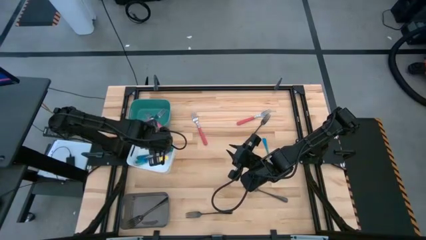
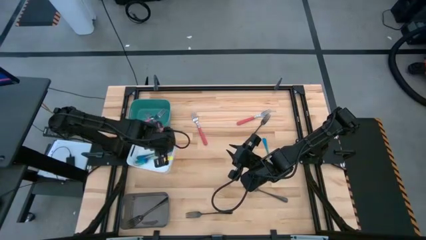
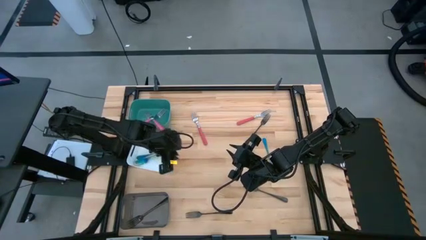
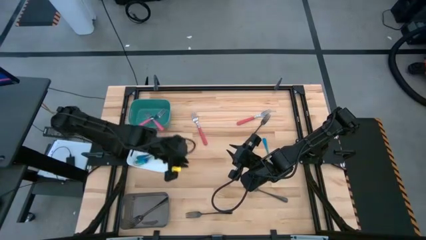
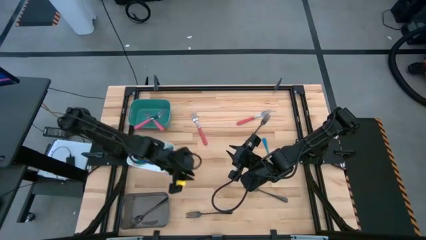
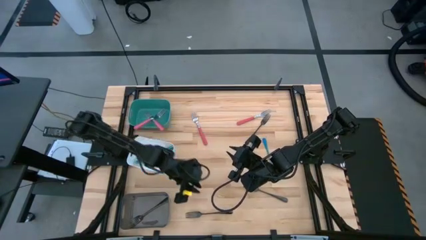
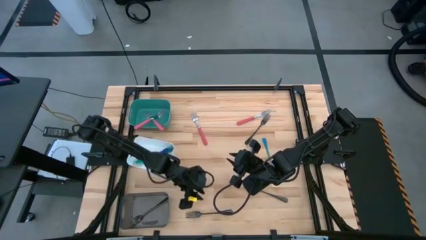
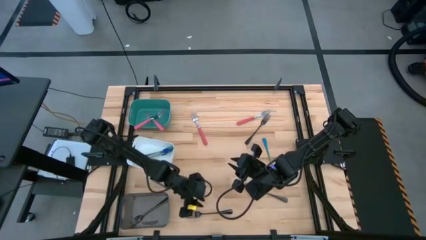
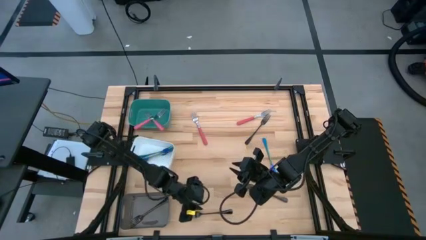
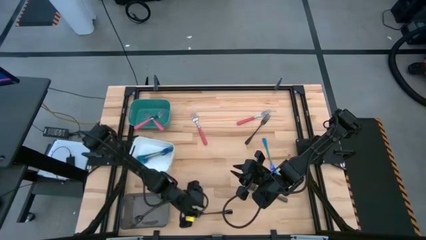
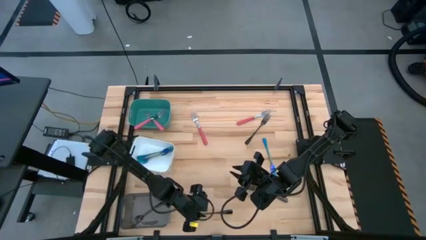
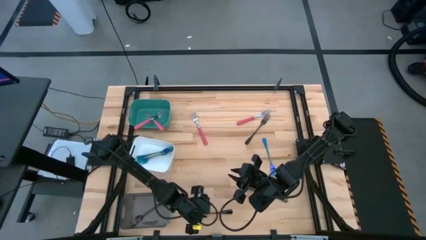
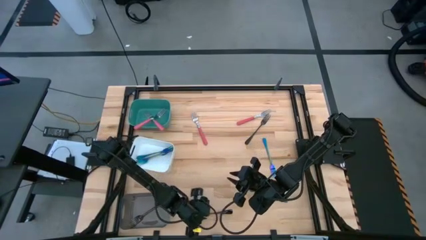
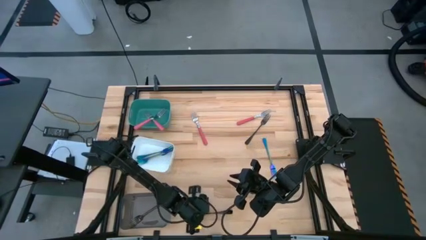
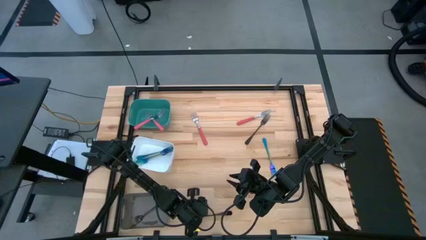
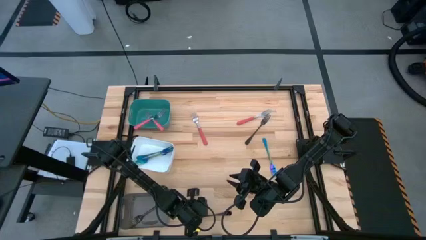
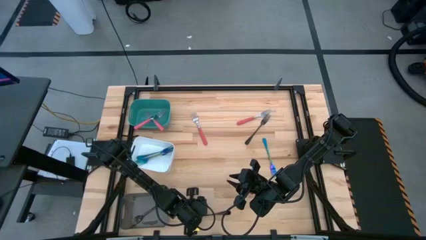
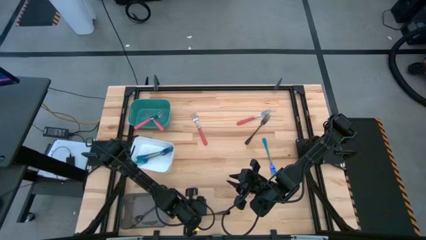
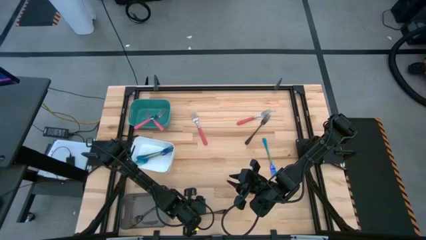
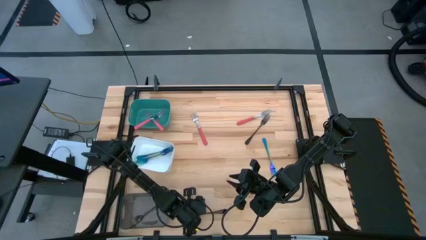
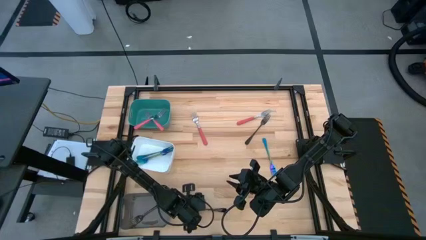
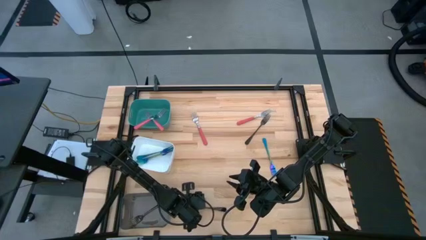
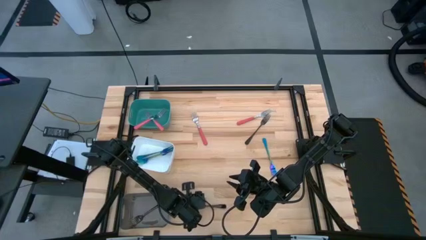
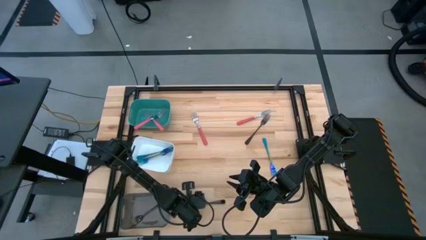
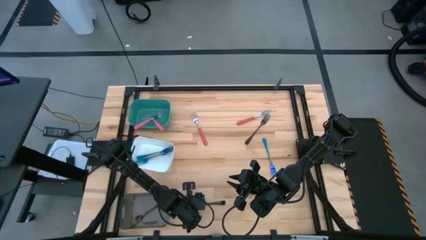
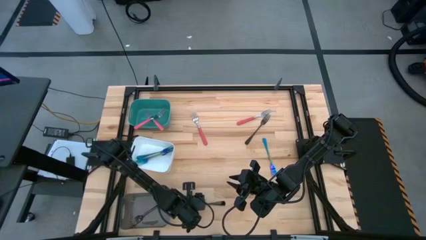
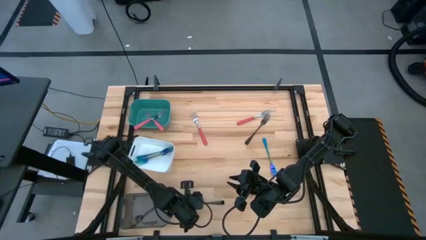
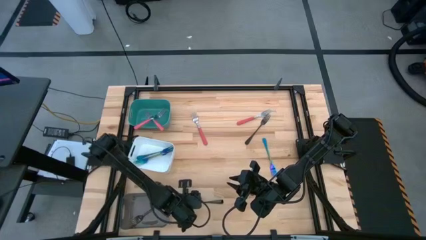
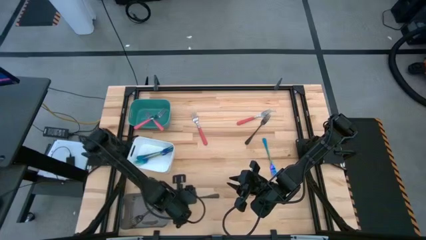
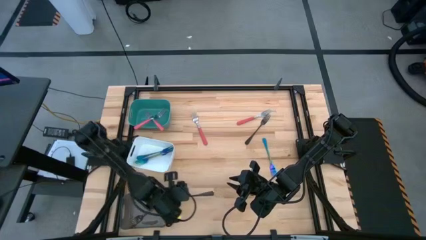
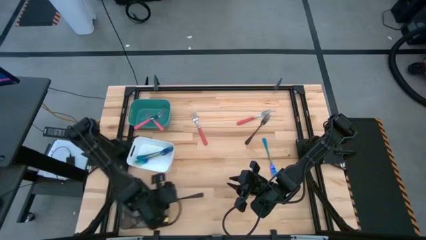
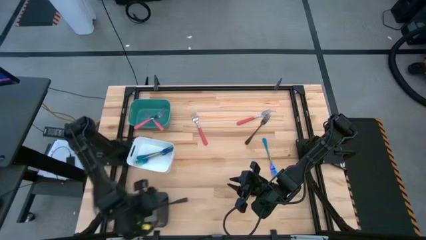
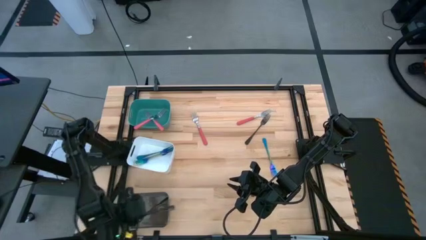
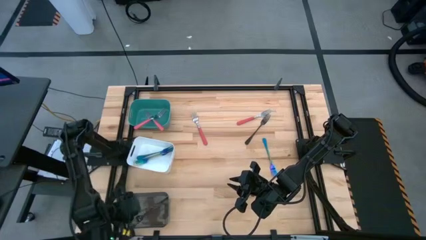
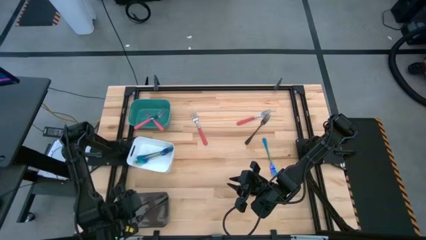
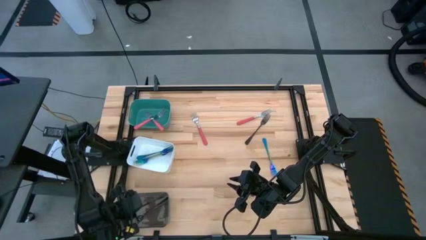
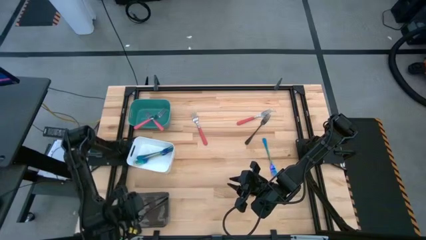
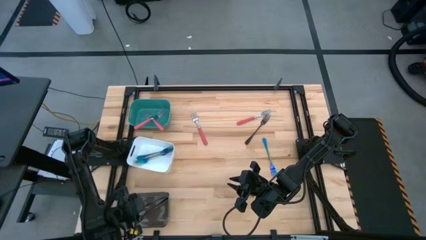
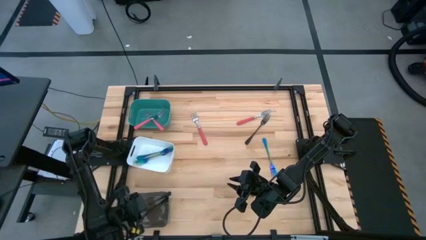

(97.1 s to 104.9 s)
Task: Sort silverware by color (type)
Put the black fork into the black bin

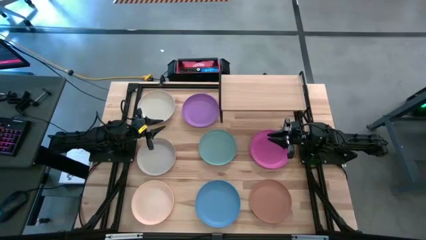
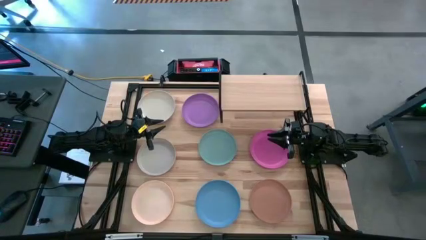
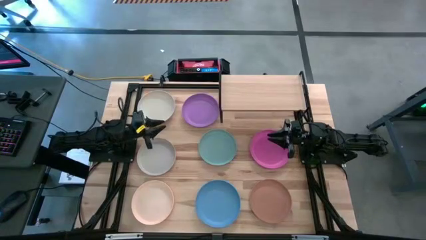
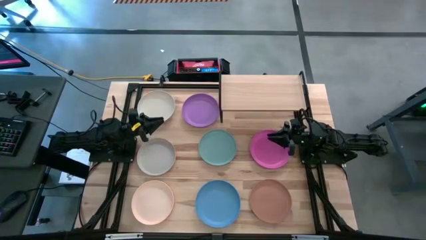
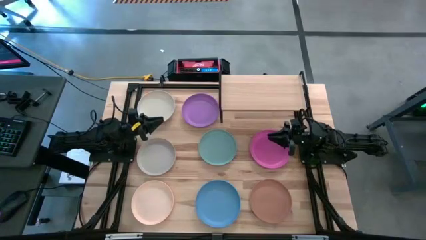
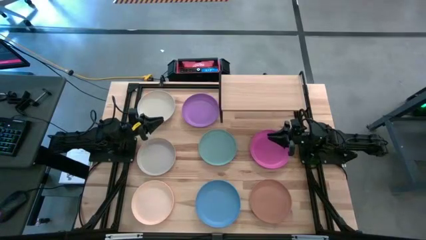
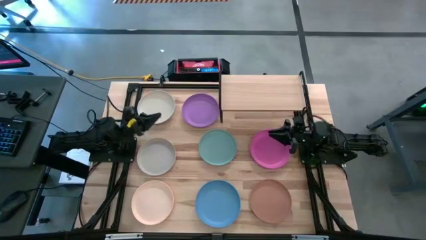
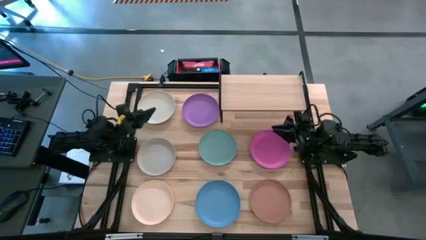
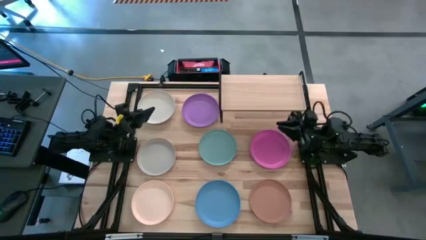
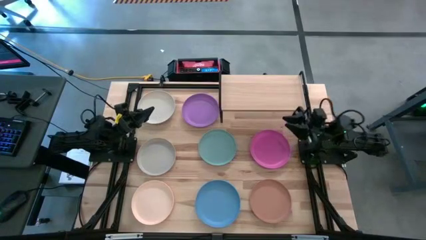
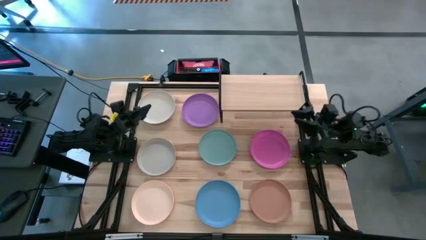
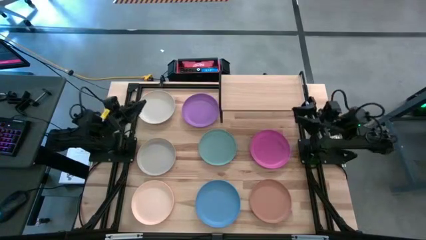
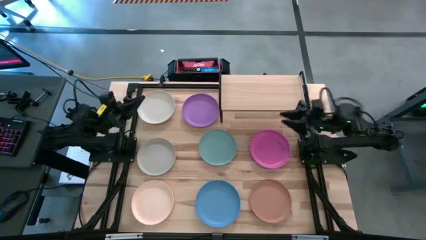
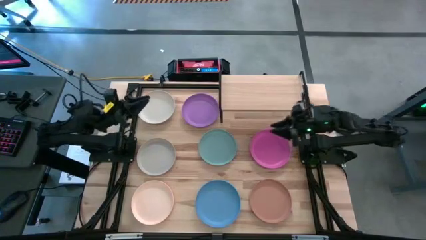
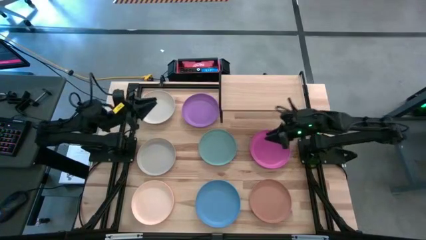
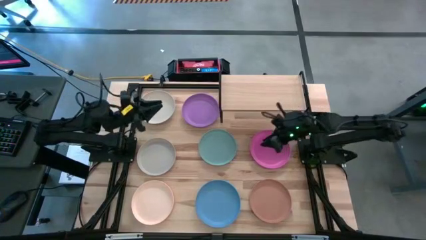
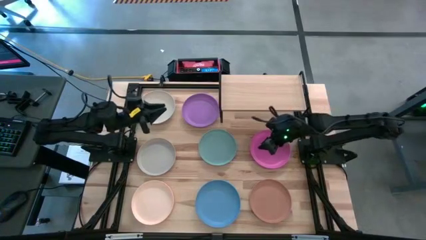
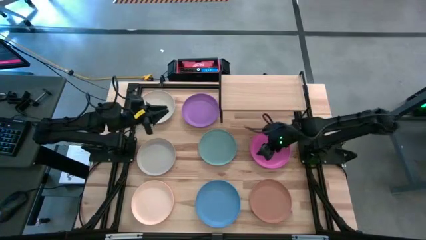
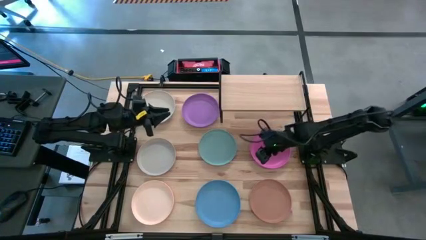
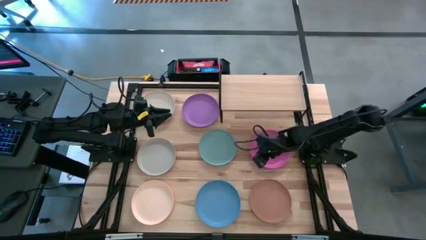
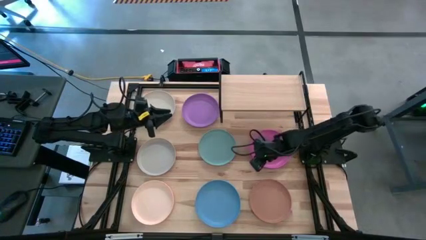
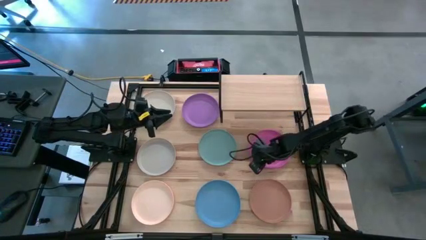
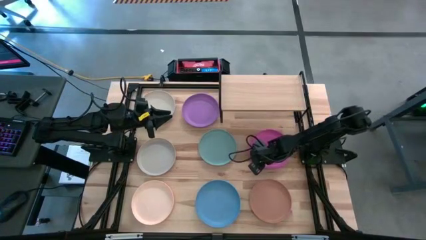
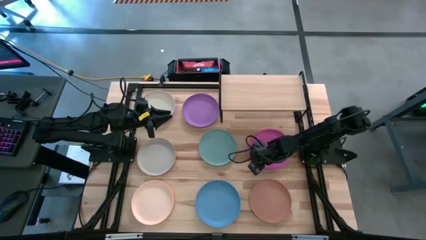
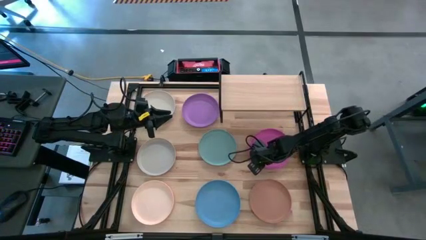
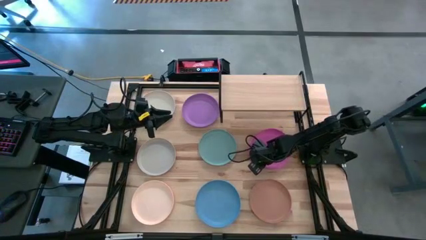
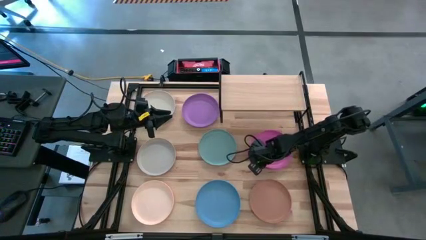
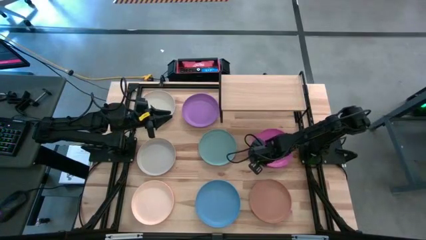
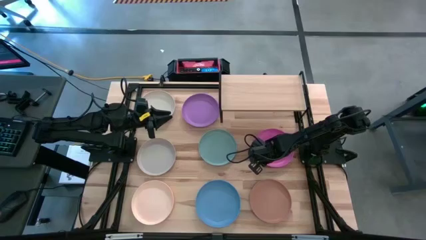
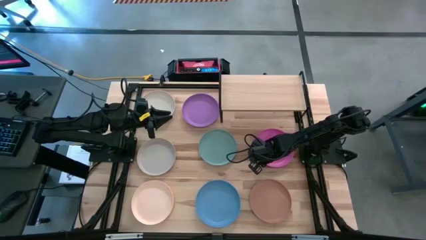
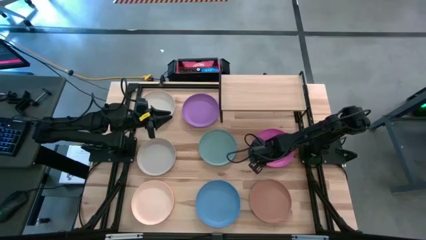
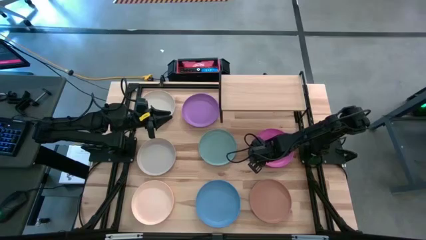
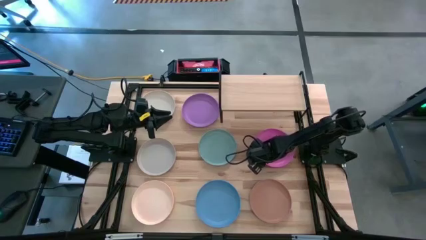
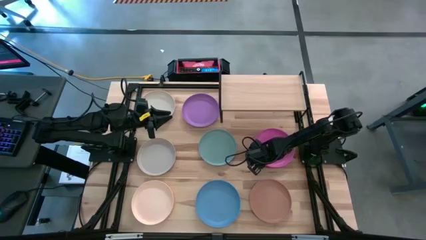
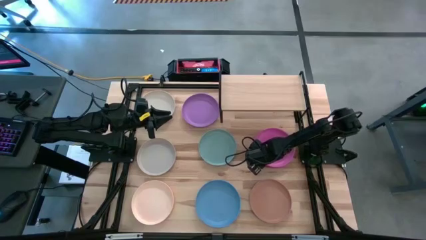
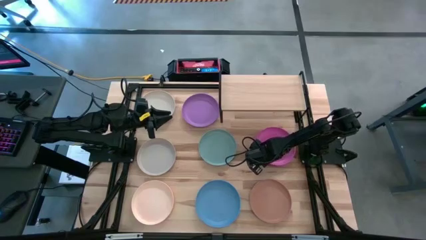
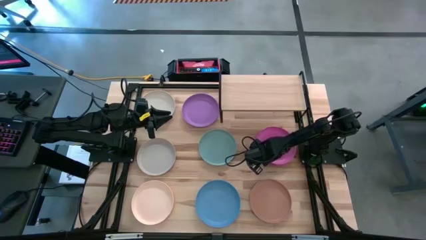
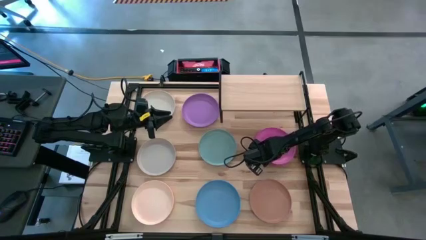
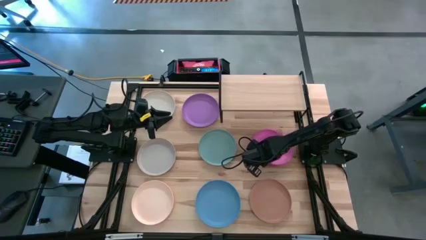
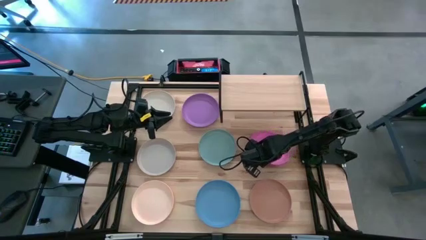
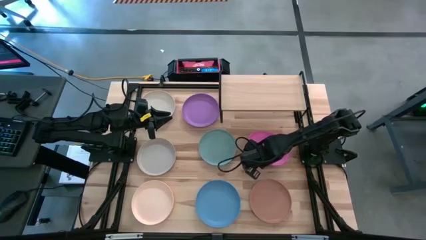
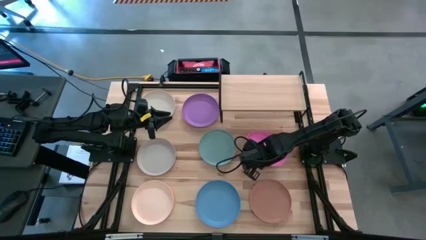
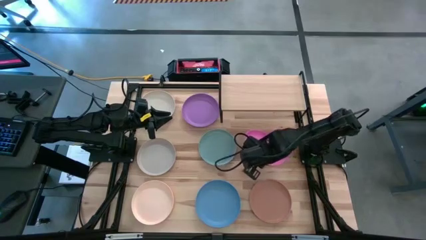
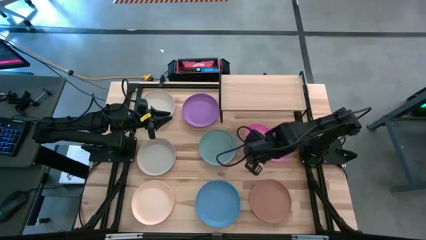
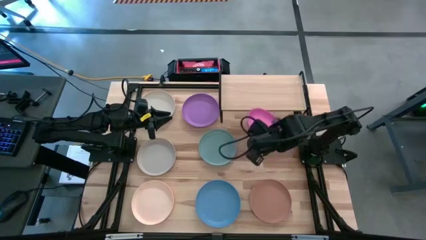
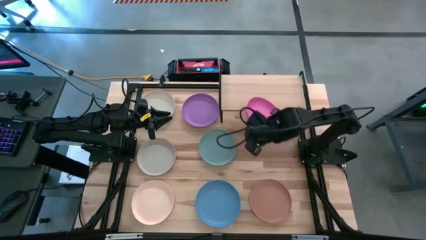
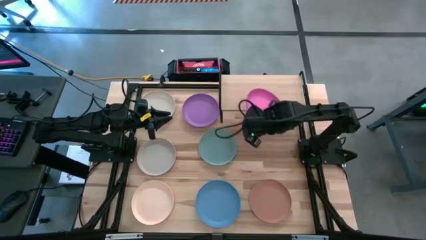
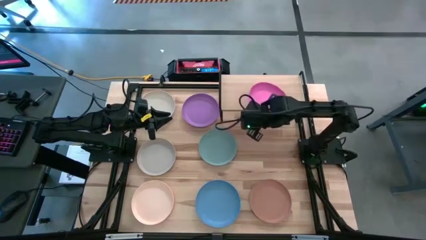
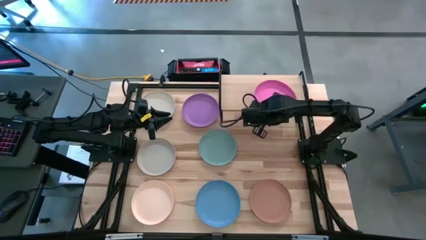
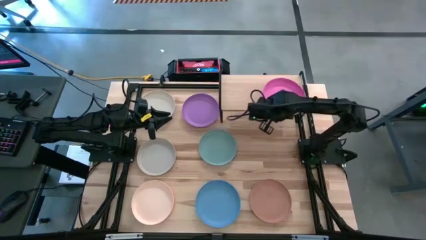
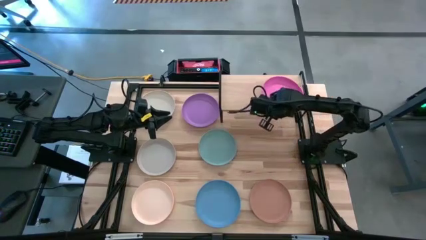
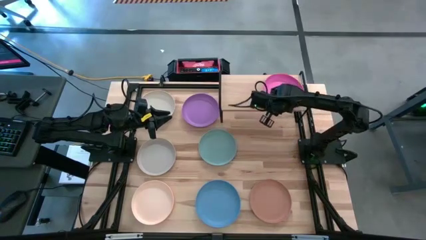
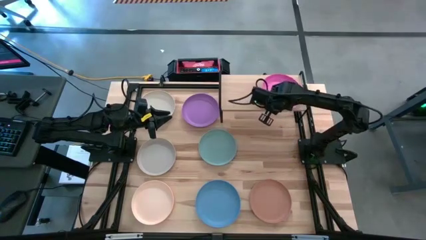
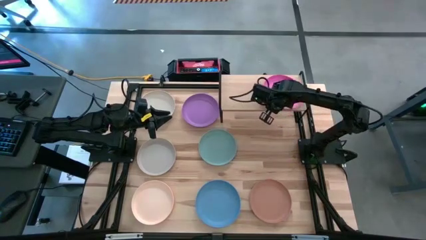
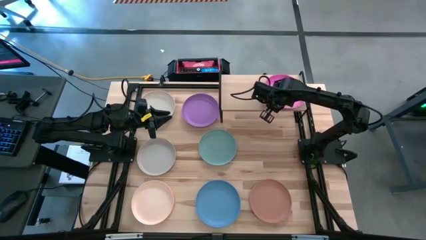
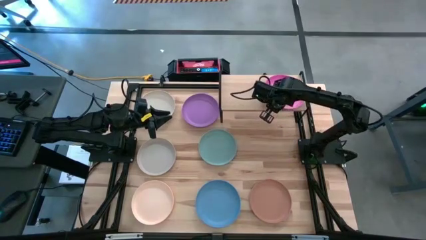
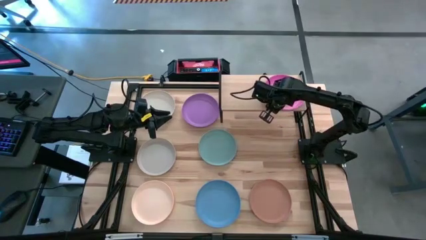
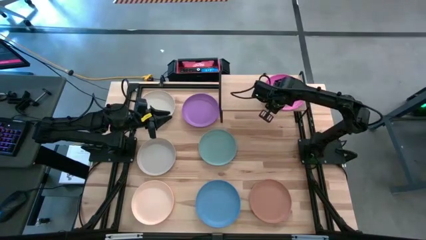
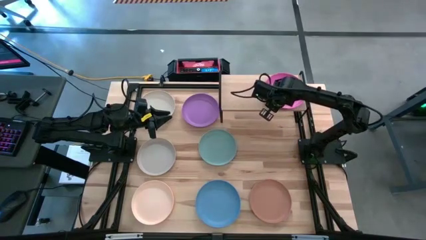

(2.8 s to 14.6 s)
Task: Place and stack plates onto a shelf
Put the pink plate on the shelf
